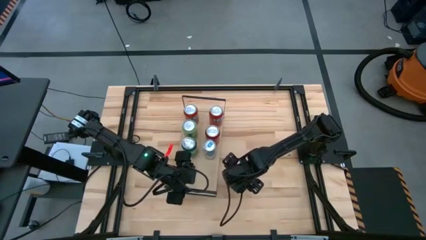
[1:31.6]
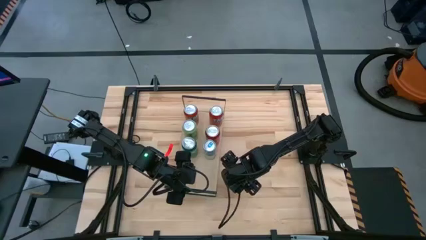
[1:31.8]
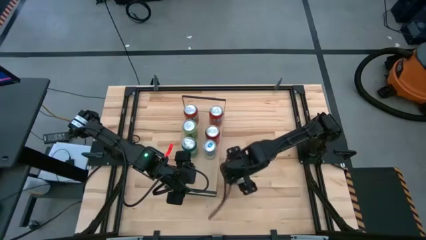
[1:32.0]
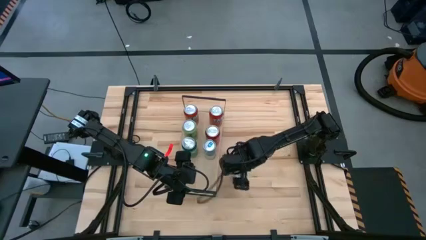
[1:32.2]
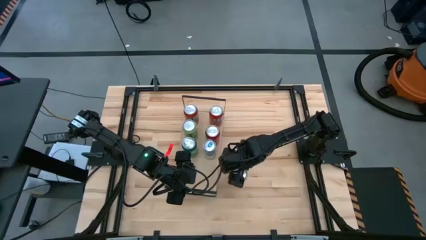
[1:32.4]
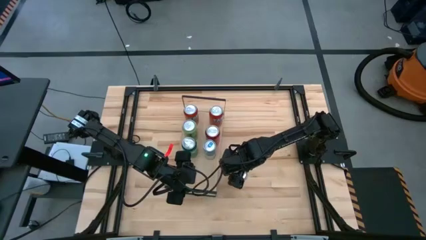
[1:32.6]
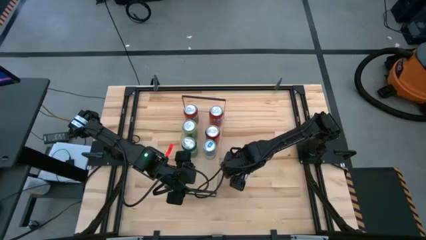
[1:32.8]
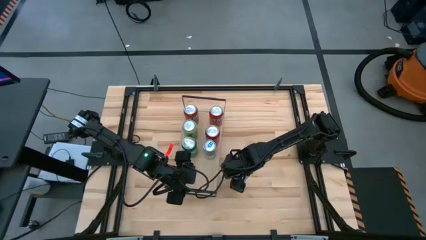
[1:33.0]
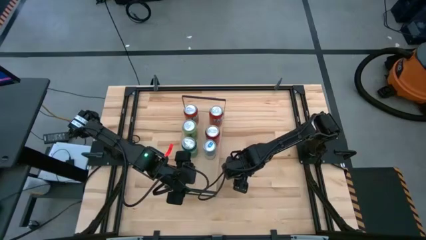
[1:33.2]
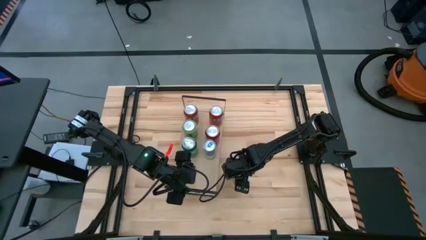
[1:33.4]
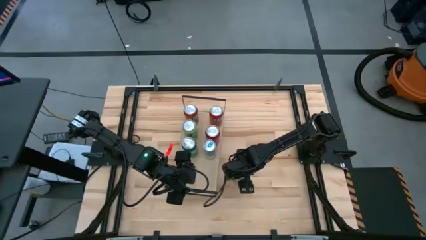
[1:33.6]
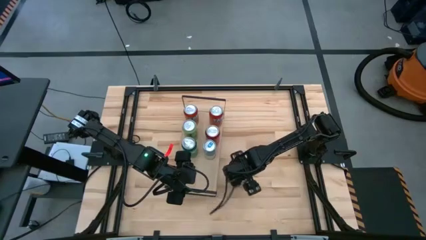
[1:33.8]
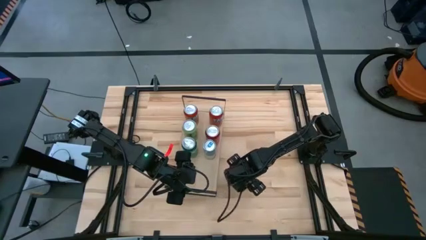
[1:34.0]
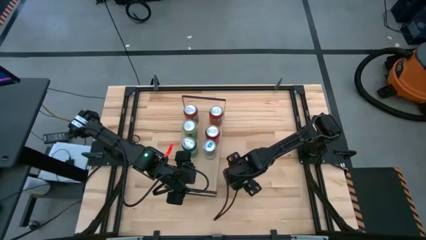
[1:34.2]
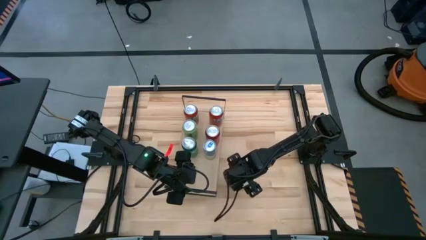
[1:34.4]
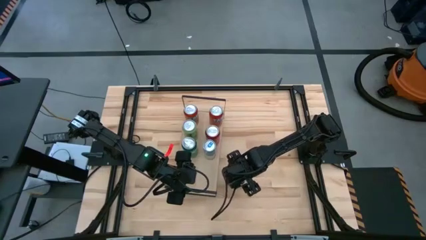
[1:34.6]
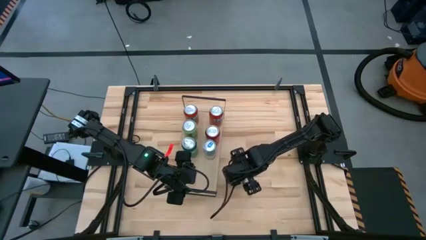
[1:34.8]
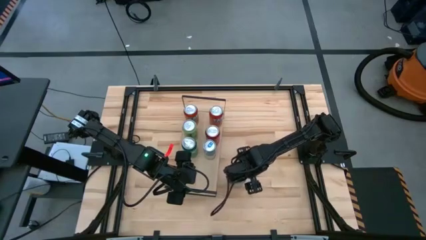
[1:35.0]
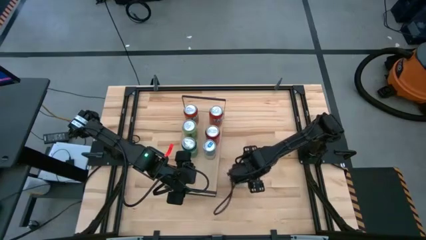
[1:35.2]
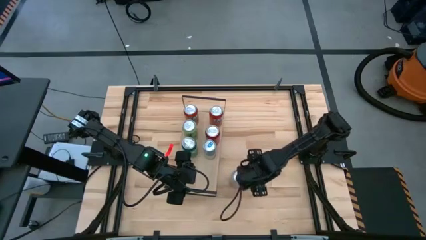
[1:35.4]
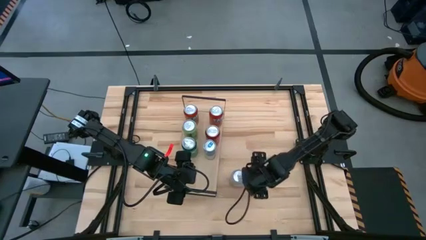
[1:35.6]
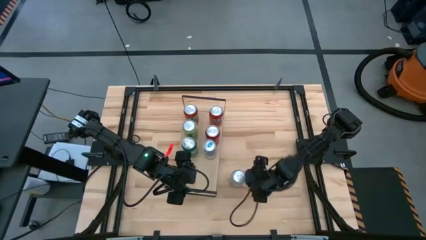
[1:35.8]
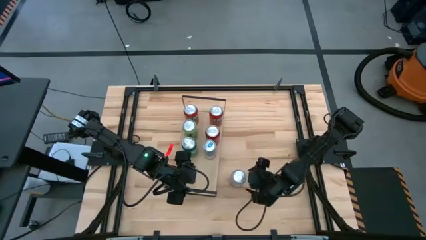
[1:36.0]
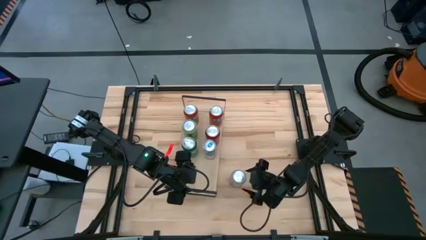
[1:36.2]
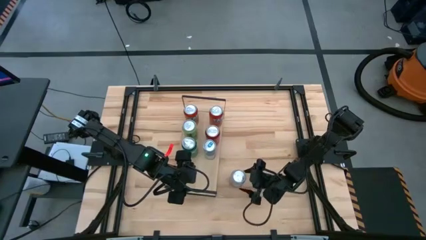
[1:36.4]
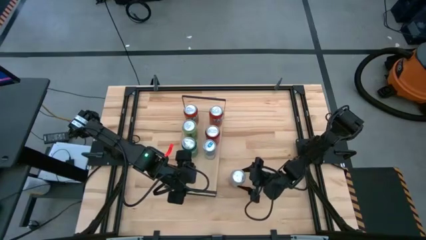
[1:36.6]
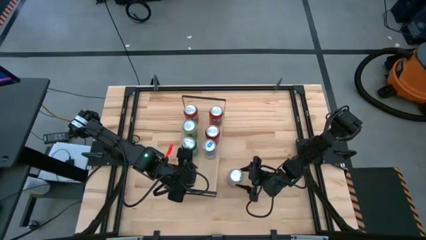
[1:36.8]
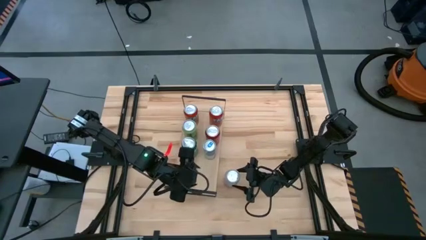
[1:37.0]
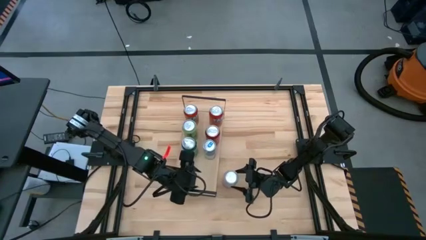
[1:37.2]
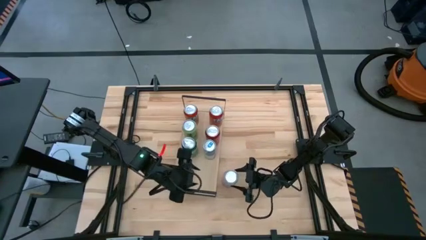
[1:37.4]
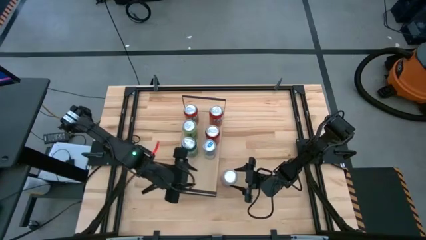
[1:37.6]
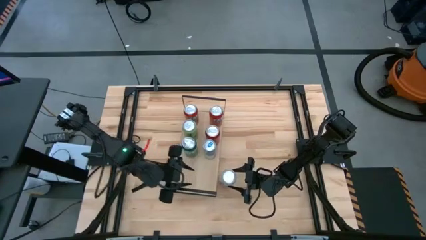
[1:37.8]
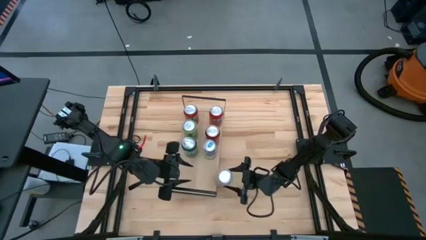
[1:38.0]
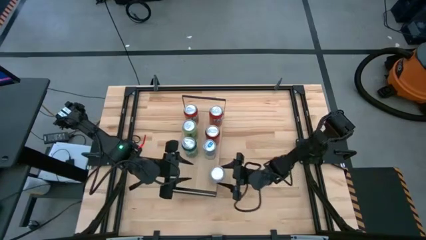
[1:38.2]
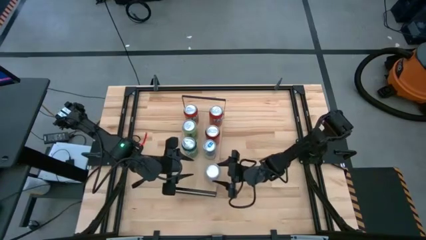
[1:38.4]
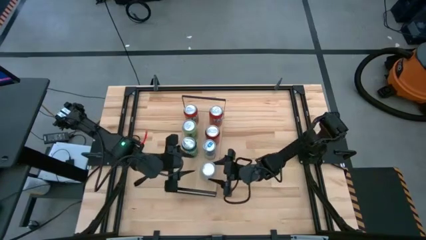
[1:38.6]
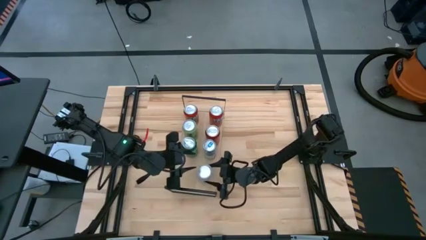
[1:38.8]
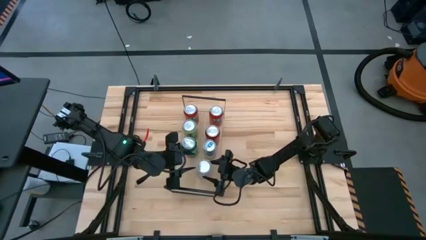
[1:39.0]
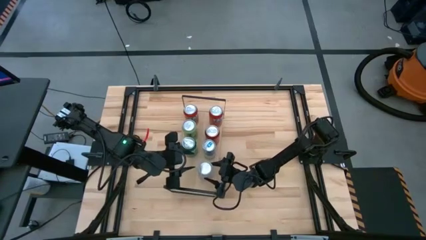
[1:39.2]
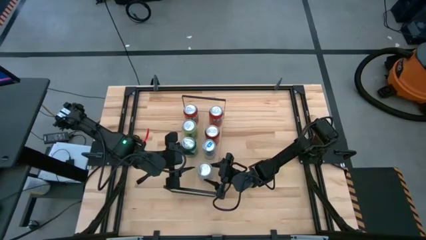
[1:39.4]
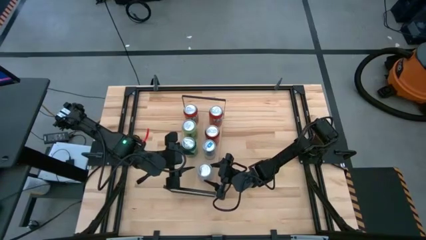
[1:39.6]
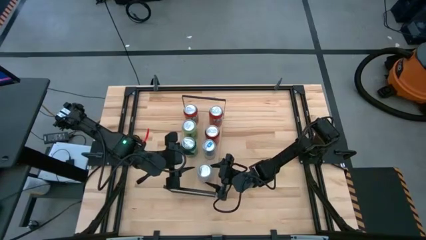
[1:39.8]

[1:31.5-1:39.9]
Task: Place canned beverage on shelf
Put the orange white soda can on the shelf

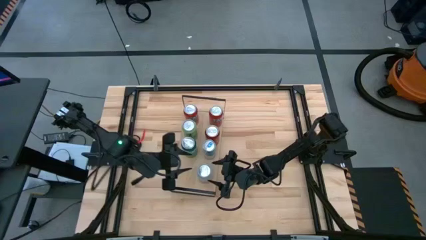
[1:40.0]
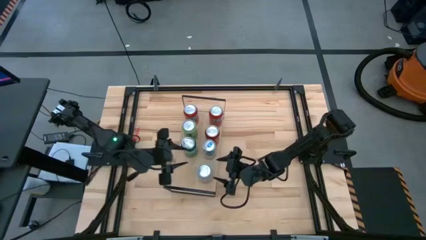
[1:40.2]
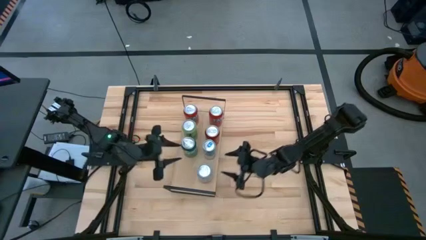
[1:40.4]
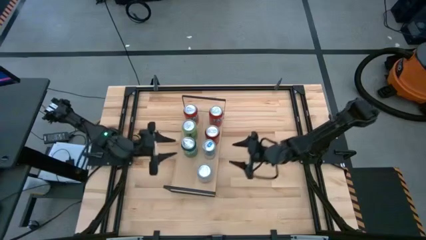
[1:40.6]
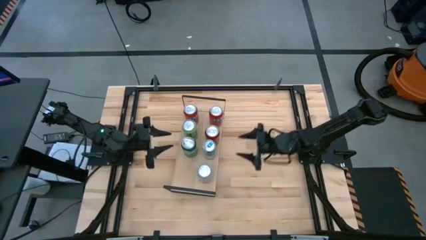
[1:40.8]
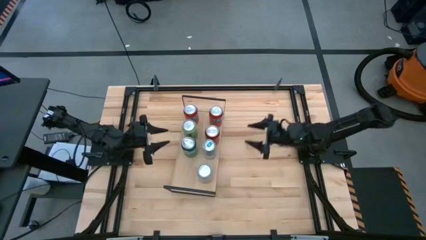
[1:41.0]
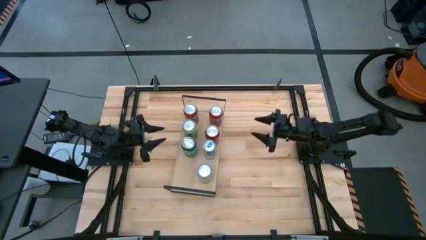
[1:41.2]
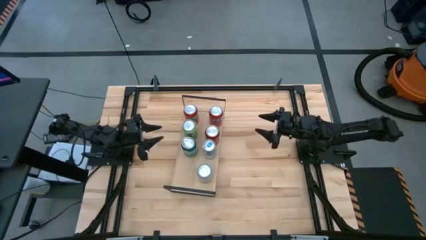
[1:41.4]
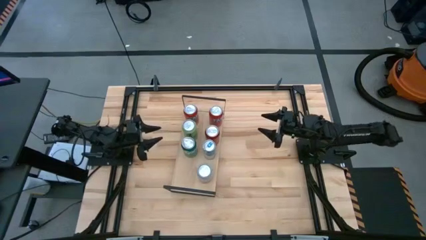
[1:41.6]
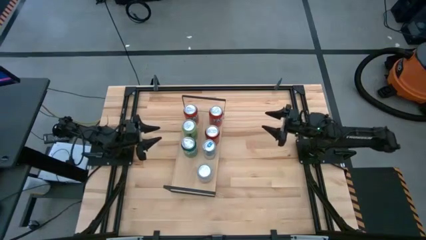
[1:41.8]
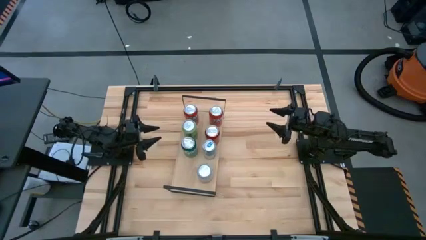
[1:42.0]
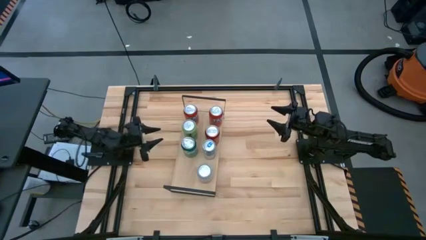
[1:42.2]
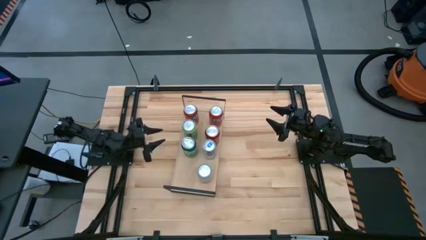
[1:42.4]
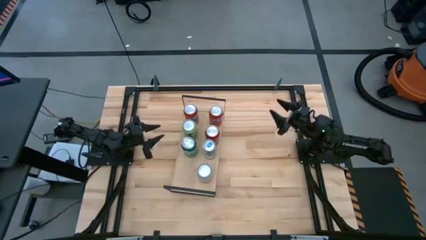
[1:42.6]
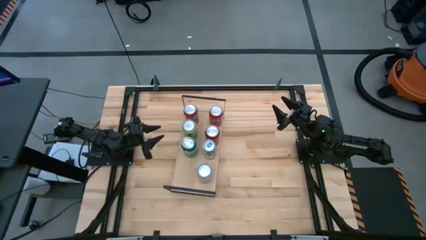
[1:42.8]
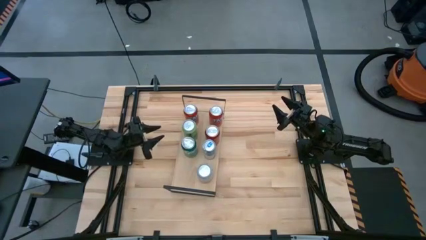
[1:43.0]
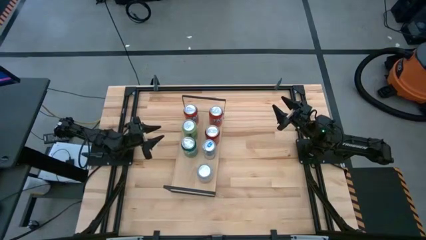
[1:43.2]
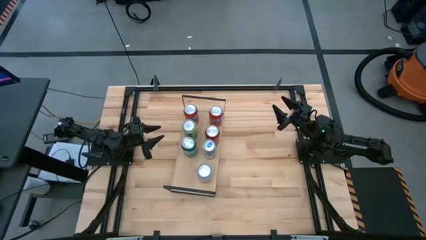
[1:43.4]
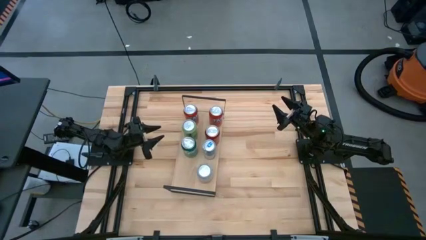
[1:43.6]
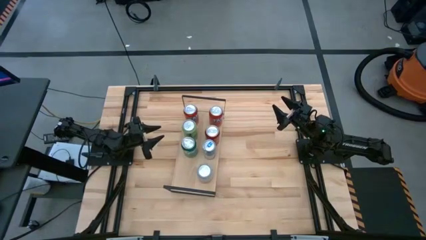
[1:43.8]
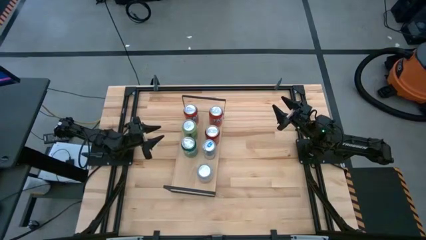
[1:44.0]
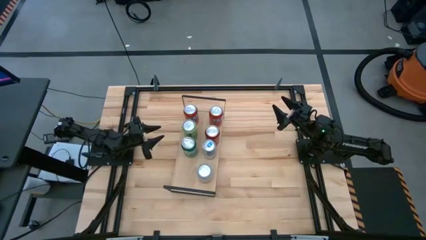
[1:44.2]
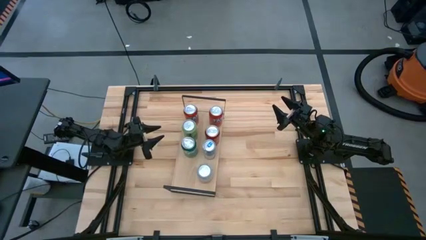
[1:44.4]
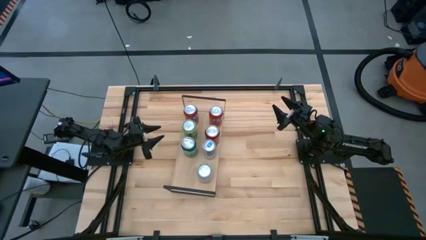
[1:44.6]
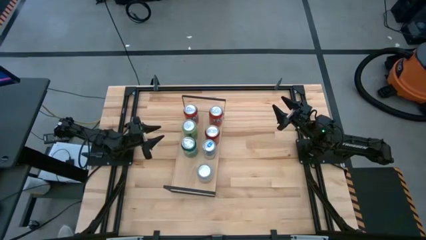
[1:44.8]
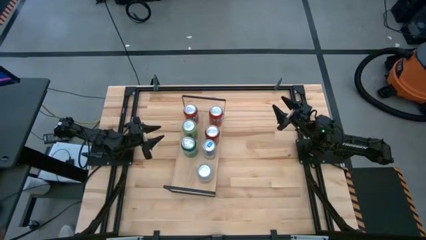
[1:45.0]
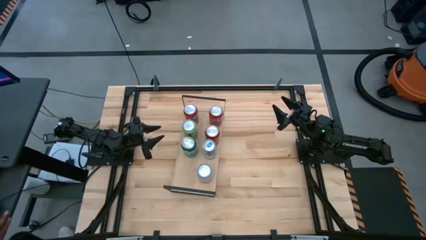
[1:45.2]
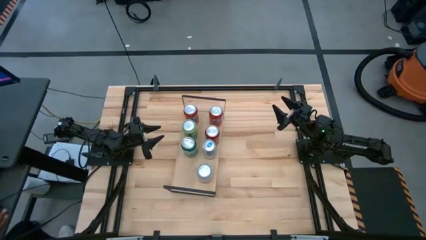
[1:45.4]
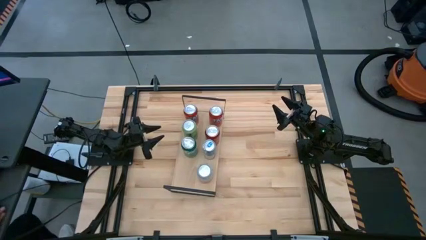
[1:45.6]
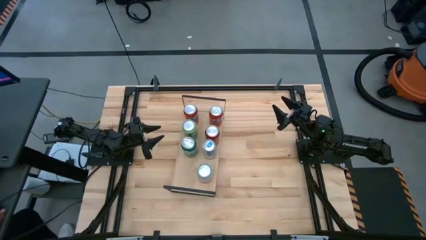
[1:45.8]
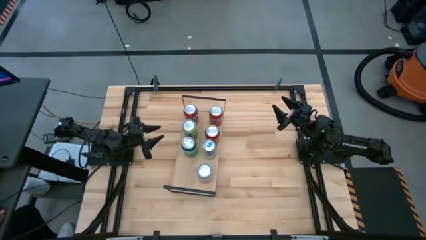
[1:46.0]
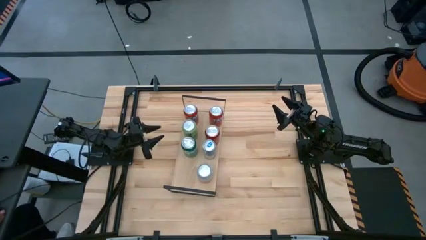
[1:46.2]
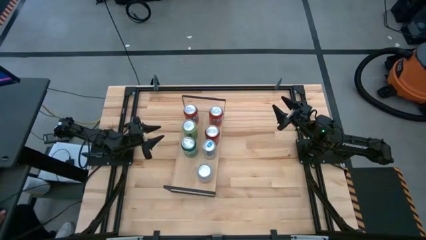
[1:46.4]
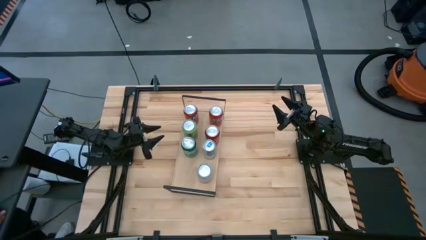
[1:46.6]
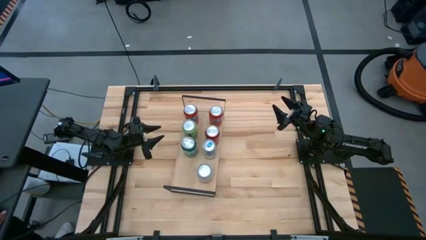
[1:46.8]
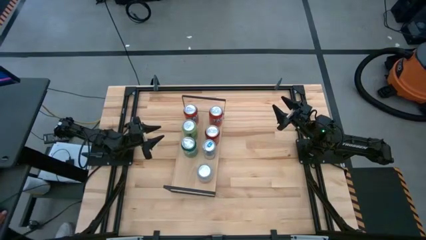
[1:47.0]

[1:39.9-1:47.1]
Return to Home Position
